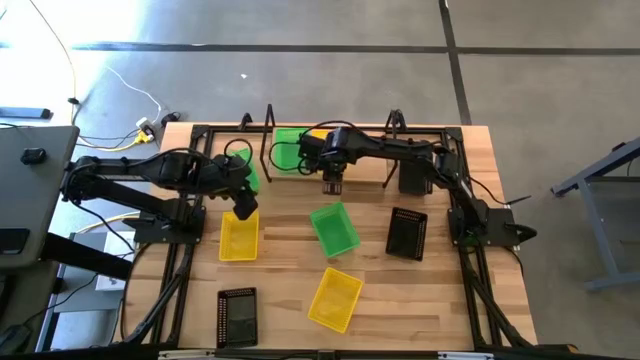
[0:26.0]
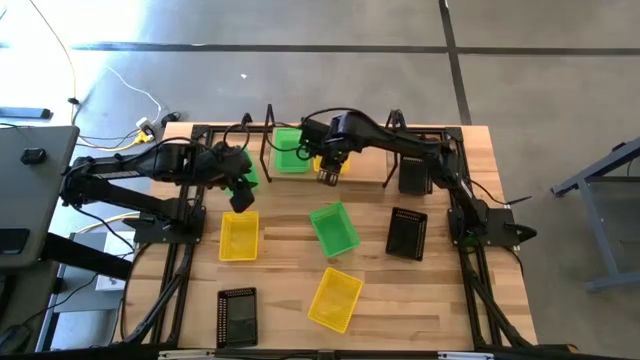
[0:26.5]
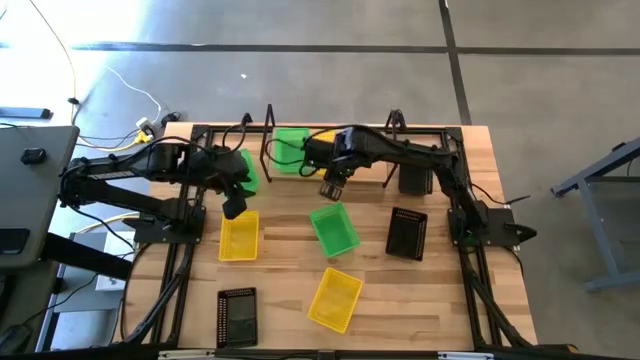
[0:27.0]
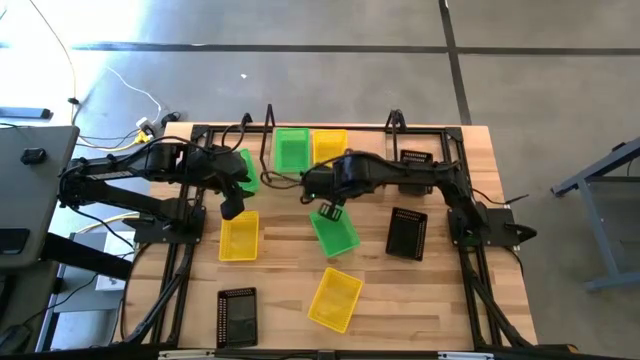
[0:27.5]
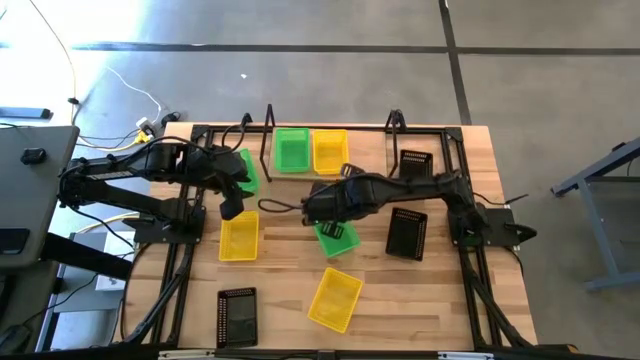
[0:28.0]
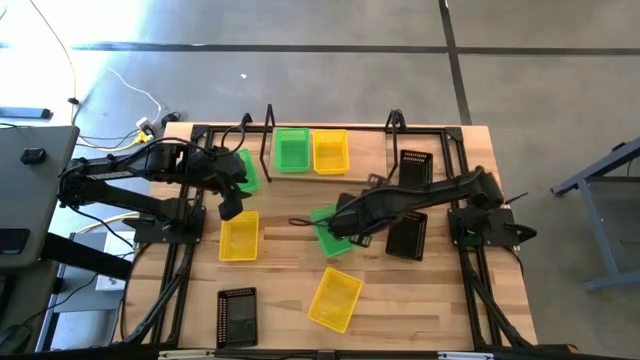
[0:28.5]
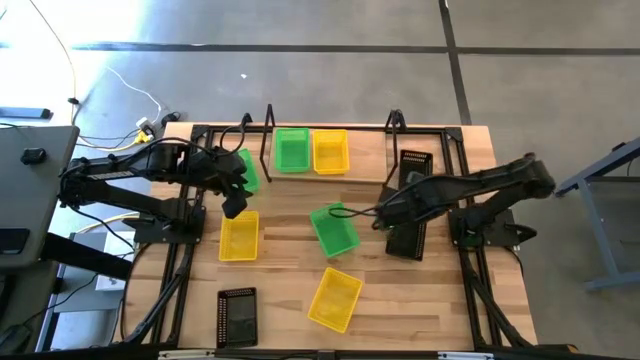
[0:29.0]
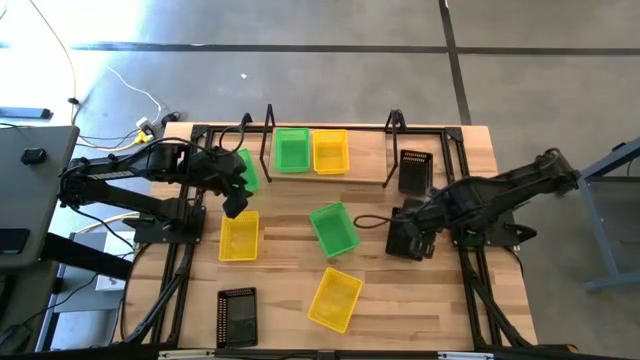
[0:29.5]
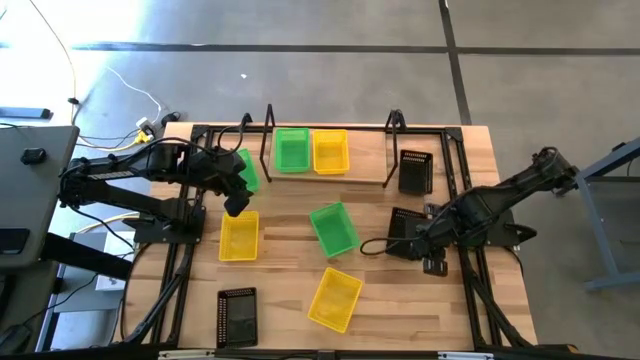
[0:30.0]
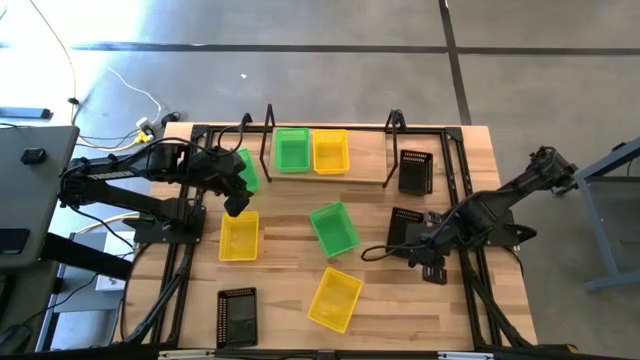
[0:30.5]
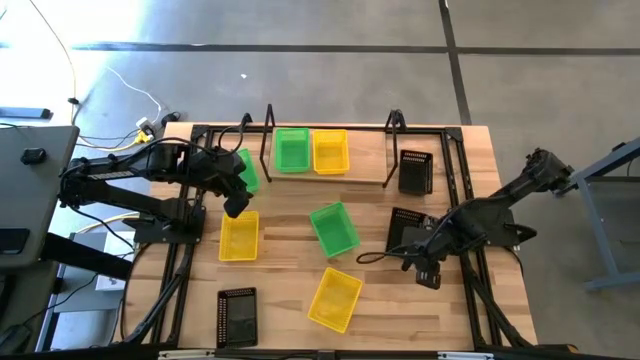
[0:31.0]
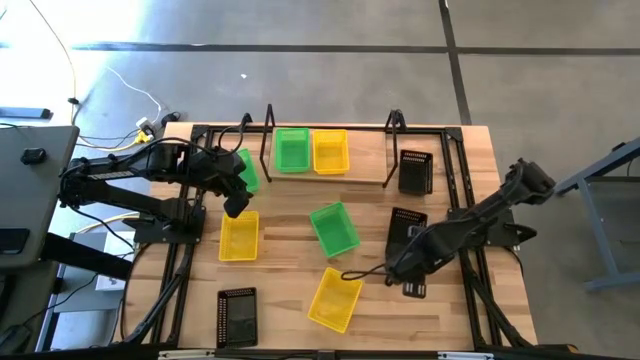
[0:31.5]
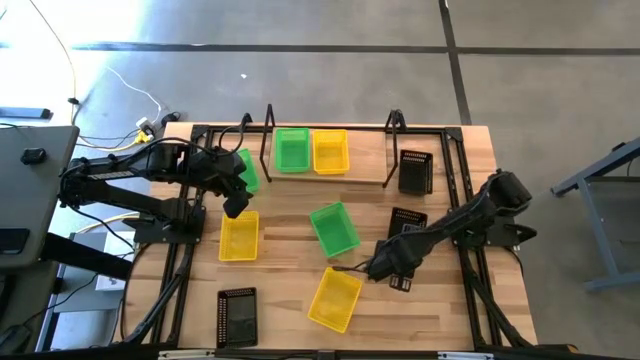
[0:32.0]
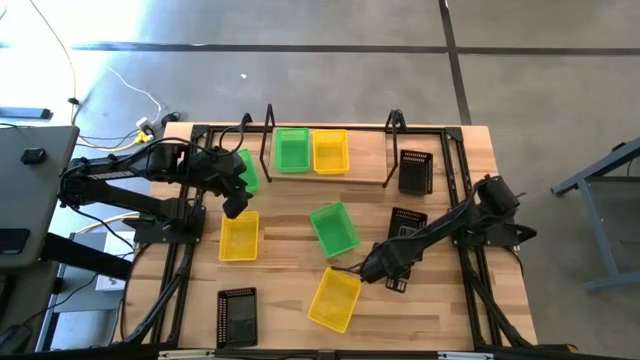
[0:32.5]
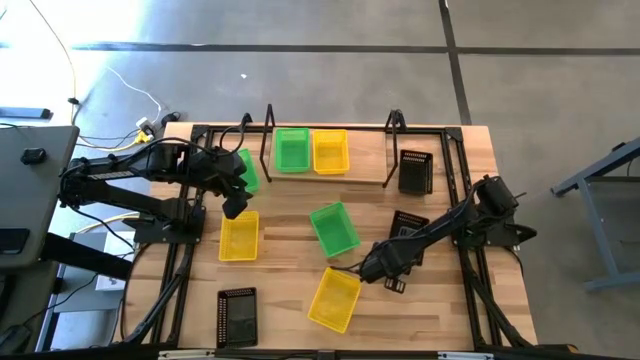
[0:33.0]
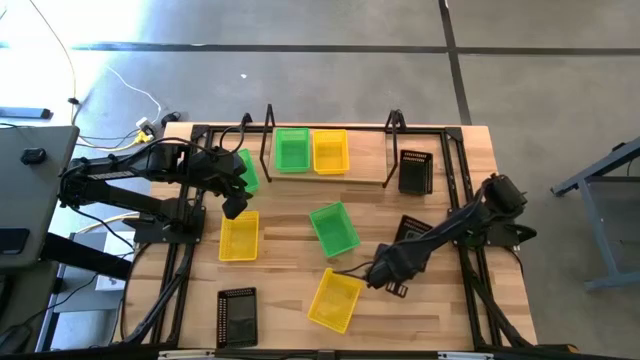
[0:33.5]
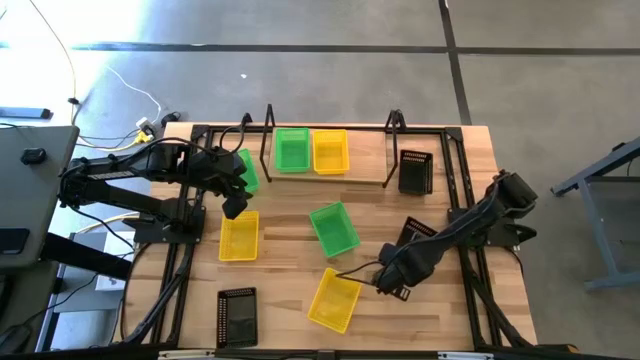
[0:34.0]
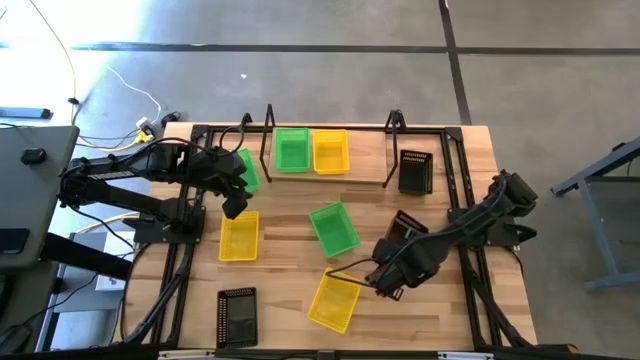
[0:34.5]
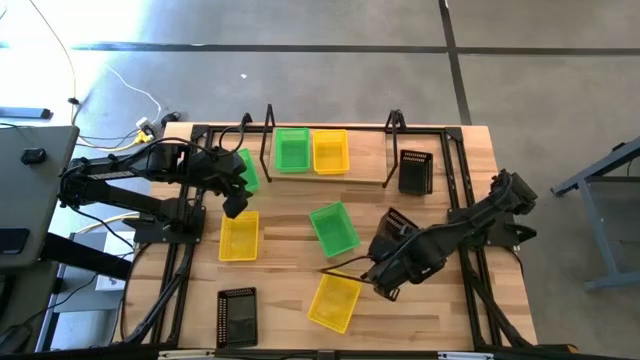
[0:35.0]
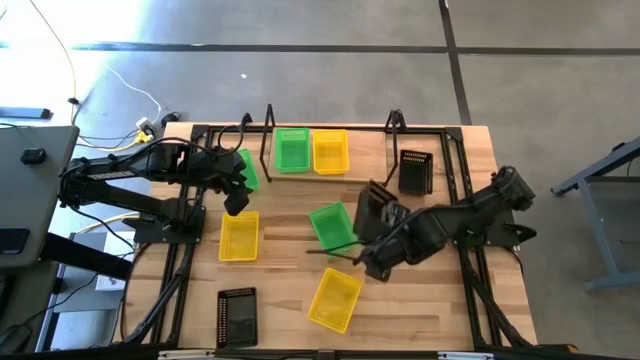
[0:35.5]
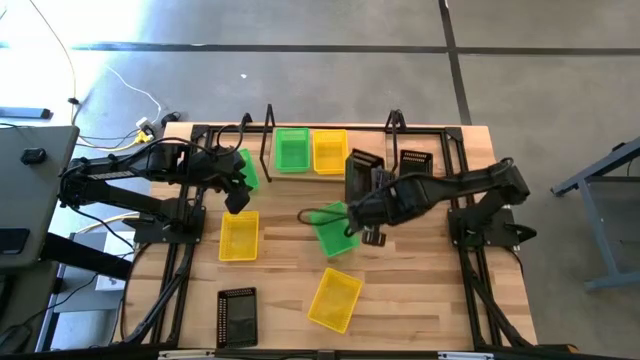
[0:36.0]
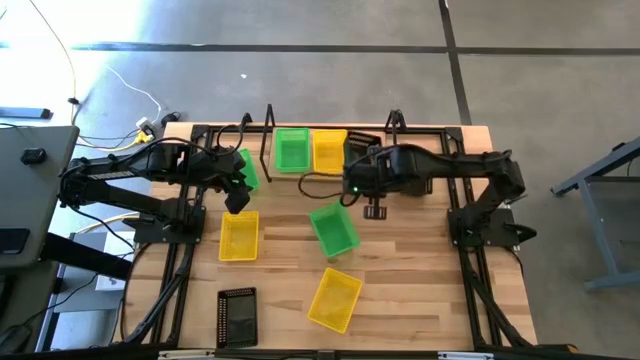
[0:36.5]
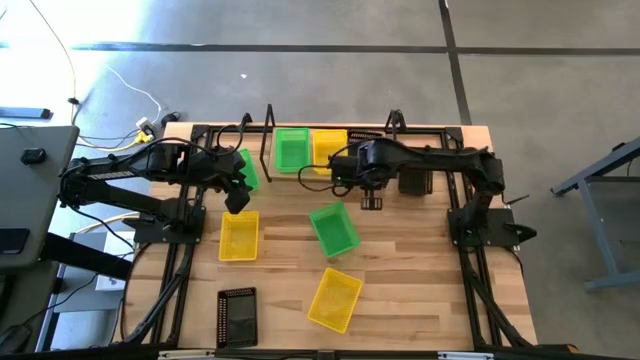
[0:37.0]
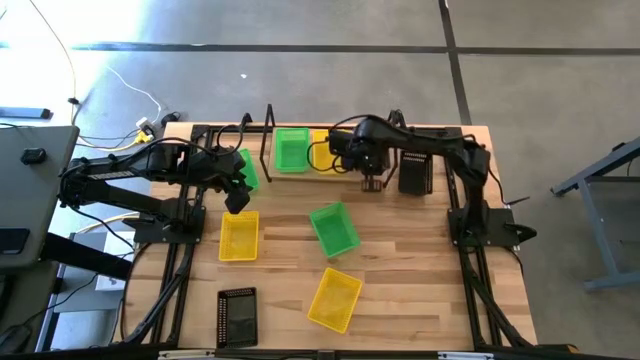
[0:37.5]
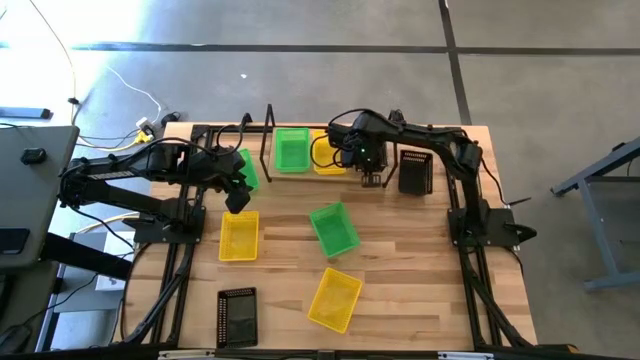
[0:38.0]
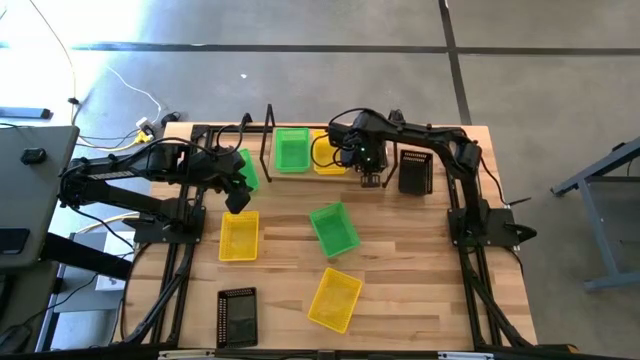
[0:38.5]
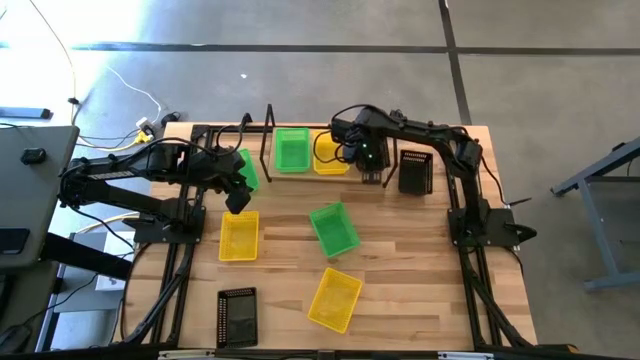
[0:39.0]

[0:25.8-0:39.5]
Task: Stack baskets on shelf by color
Put the middle right black bin on the shelf

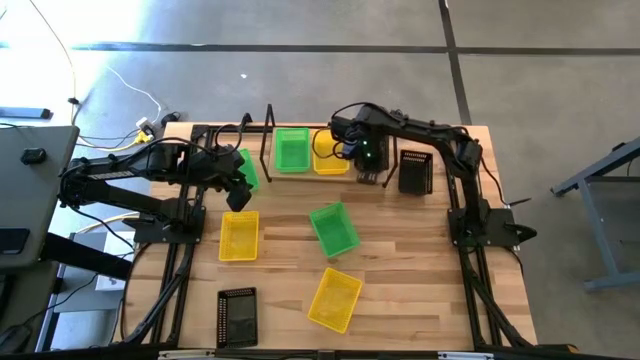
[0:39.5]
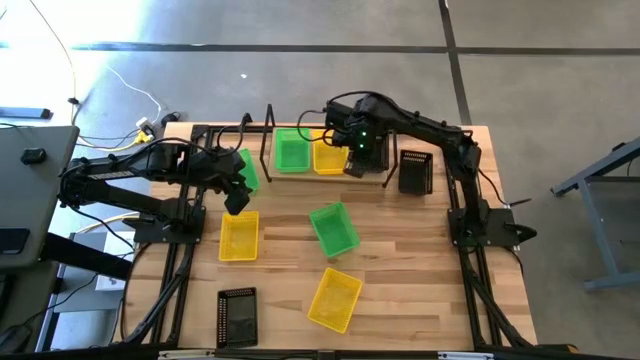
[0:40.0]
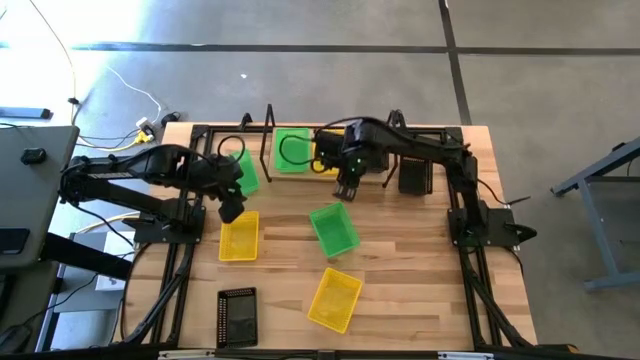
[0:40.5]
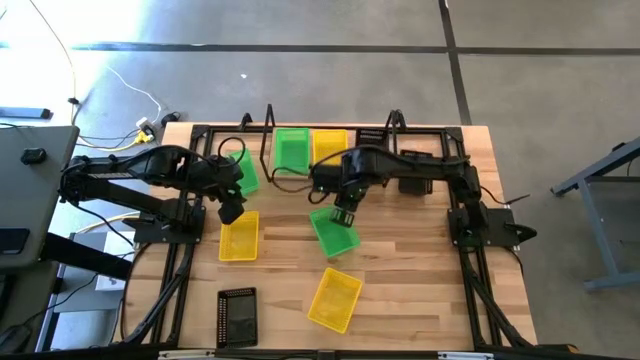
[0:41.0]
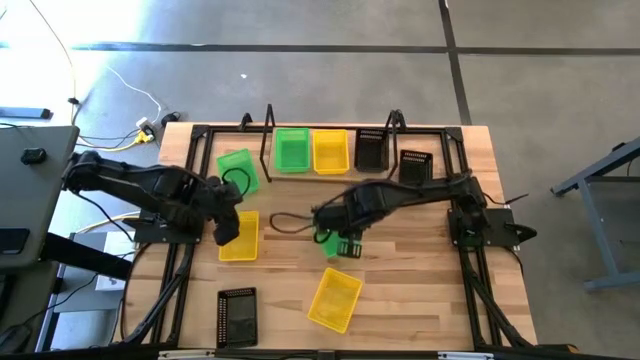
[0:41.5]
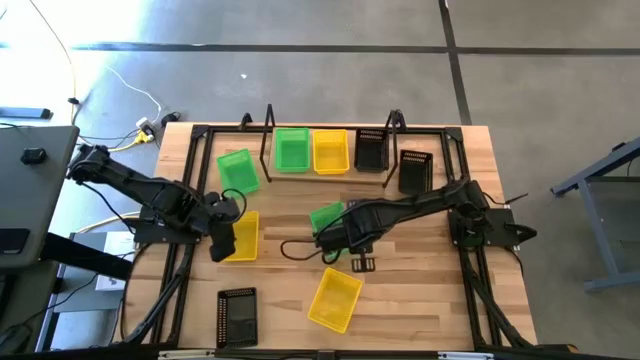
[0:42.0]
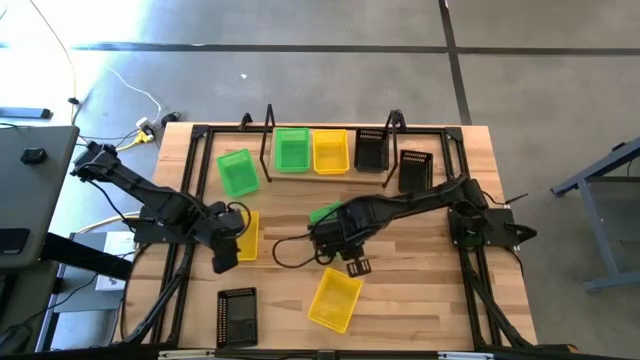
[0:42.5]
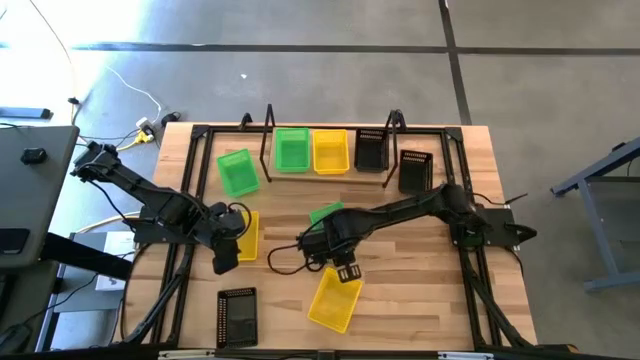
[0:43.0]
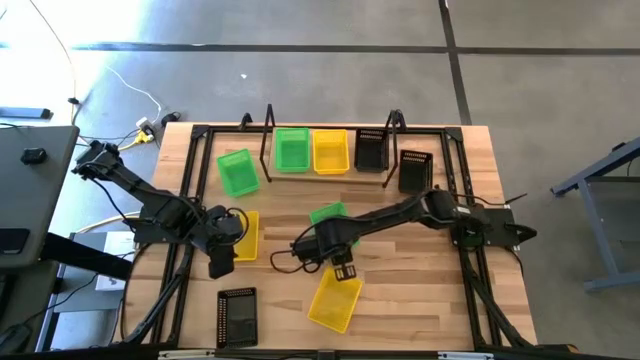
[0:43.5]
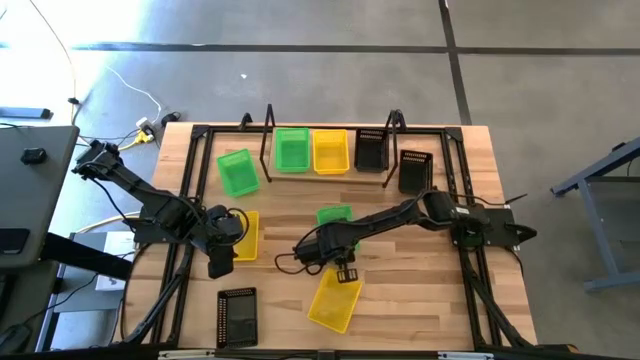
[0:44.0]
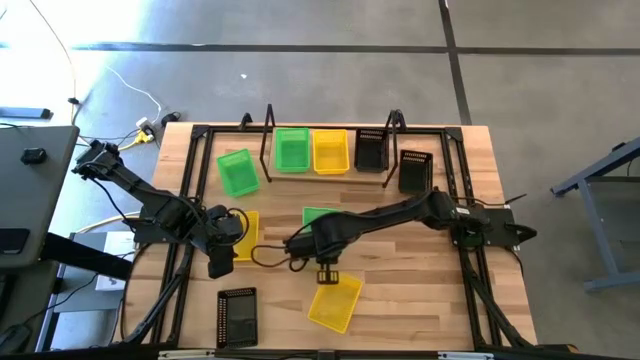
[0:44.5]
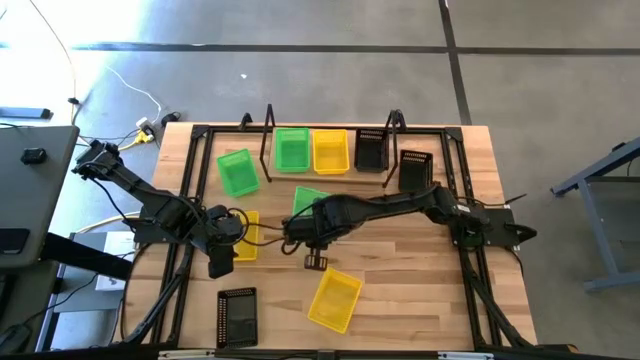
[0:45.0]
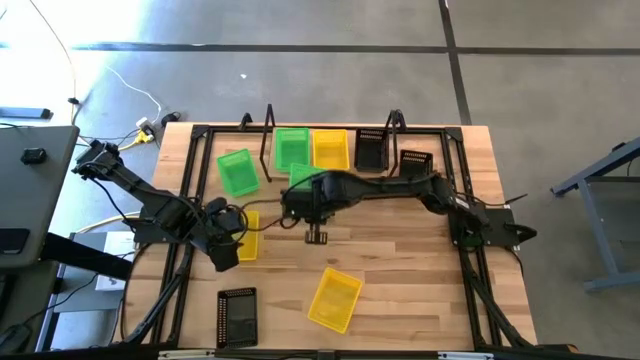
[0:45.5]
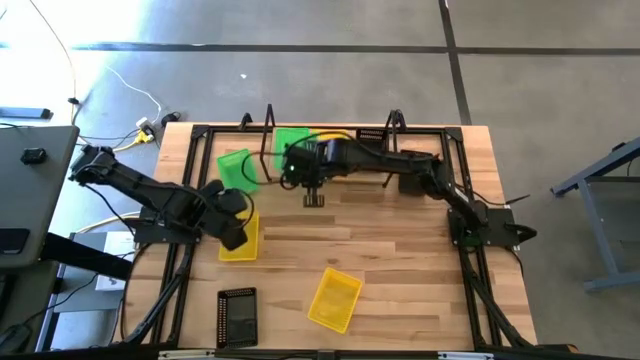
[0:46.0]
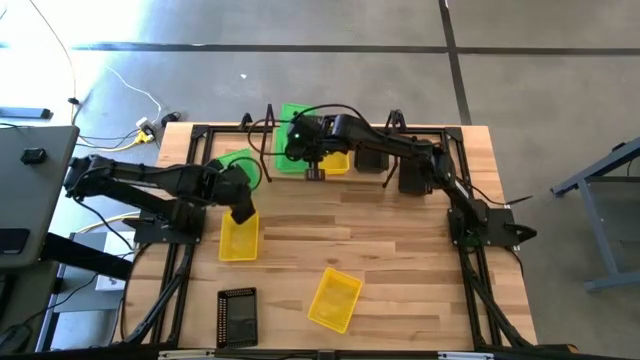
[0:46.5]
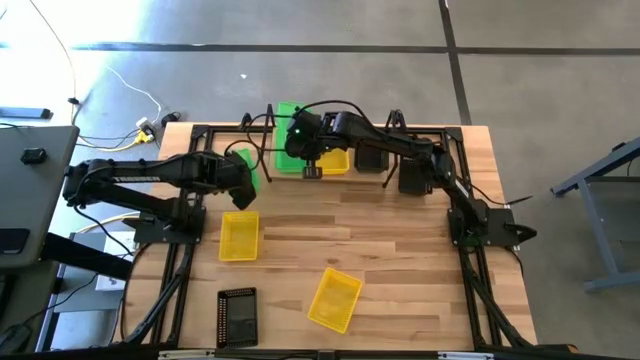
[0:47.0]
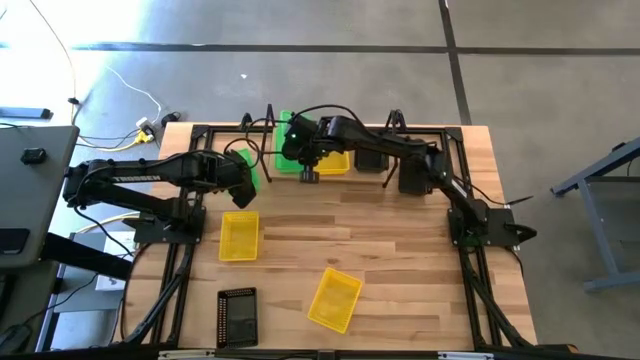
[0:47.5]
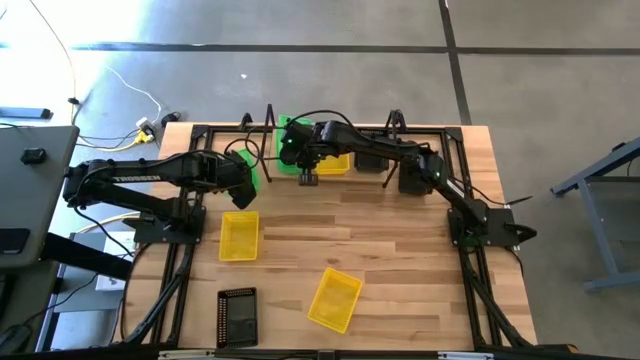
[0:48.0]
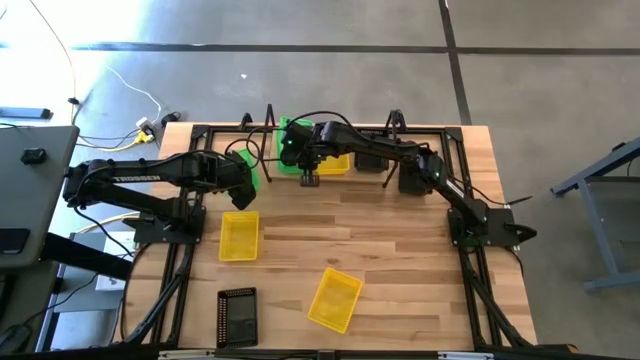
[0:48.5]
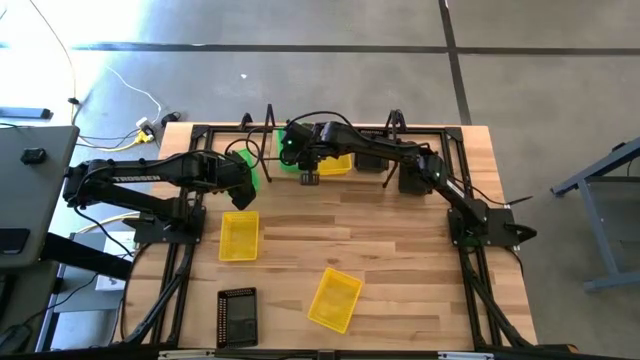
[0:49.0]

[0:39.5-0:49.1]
Stack the right green bin on top of the green bin on the shelf
